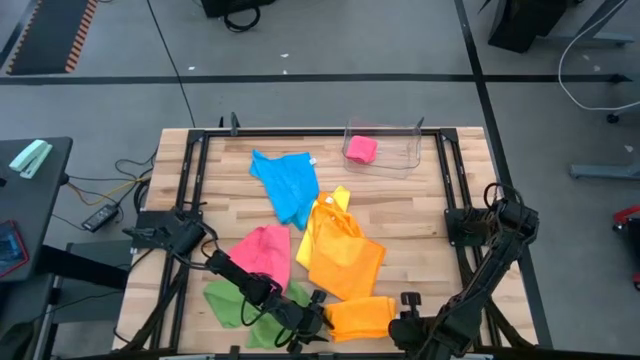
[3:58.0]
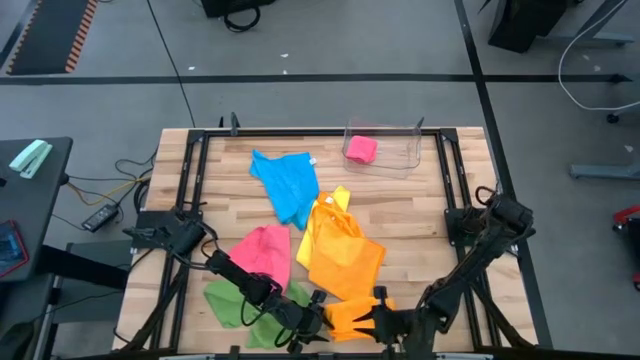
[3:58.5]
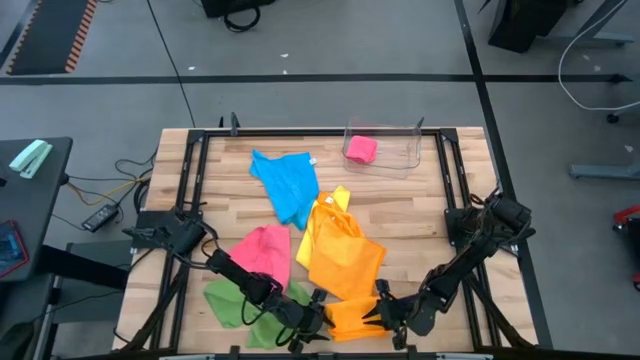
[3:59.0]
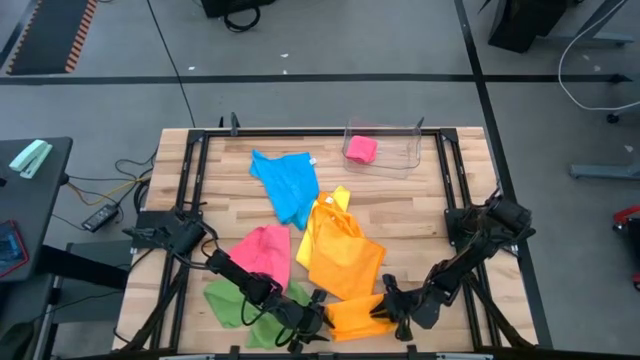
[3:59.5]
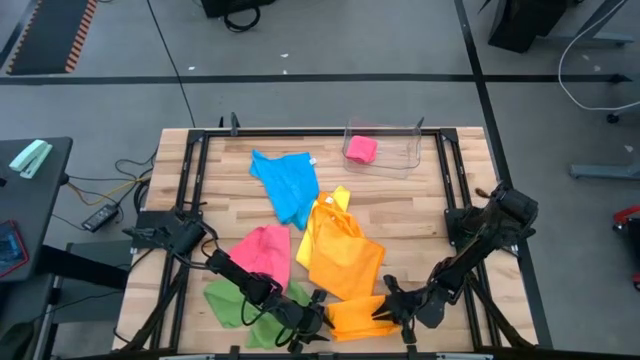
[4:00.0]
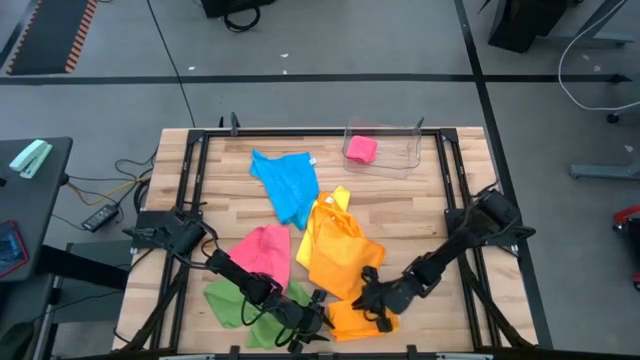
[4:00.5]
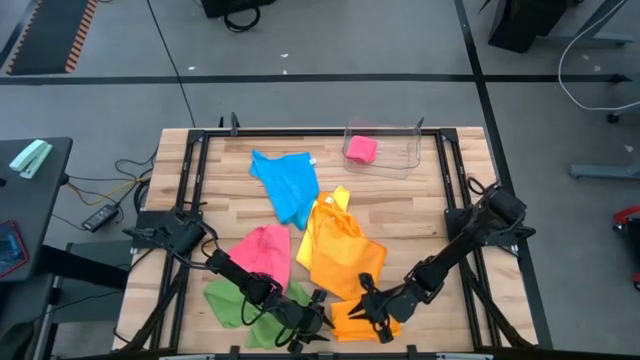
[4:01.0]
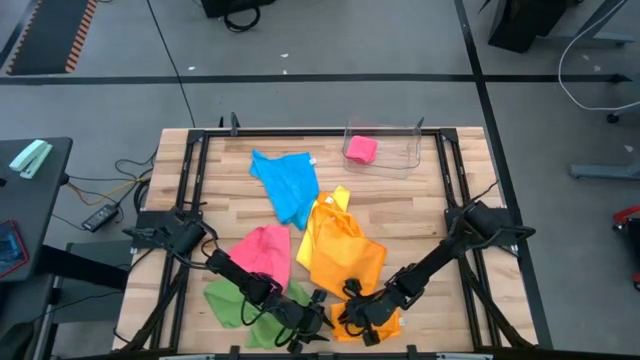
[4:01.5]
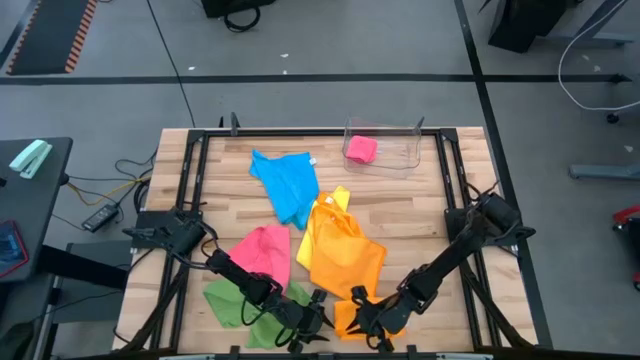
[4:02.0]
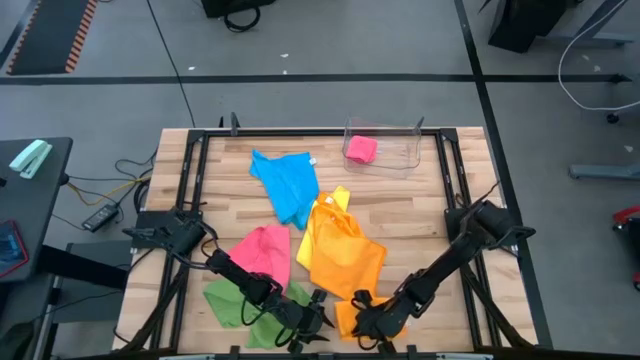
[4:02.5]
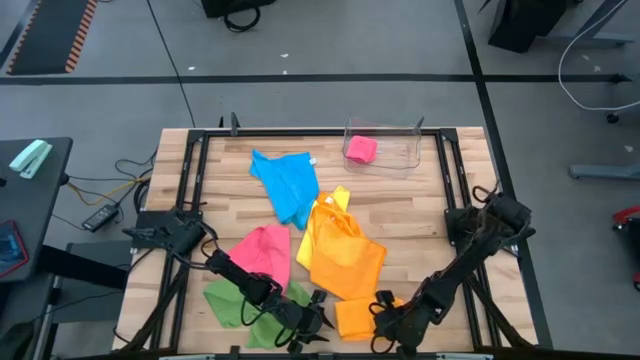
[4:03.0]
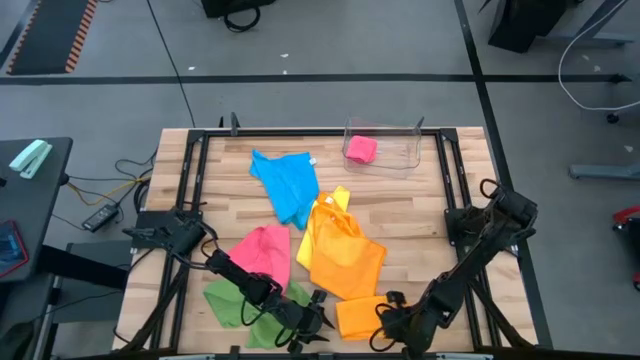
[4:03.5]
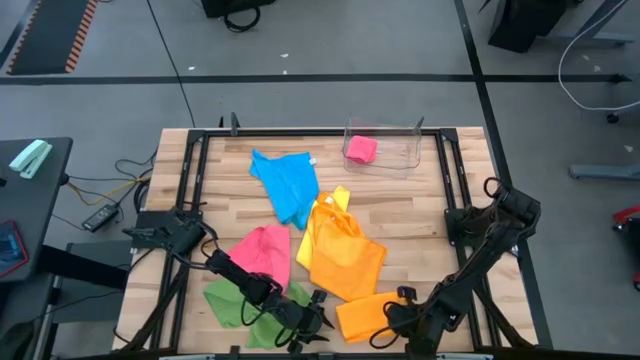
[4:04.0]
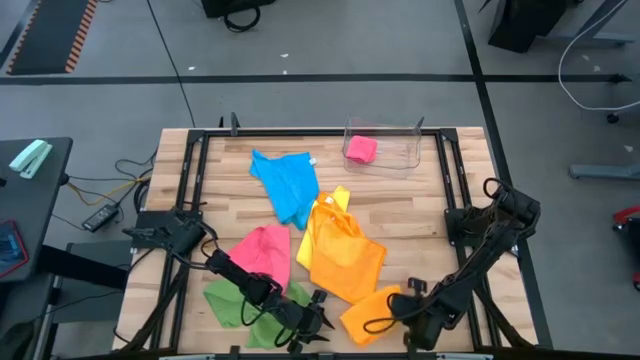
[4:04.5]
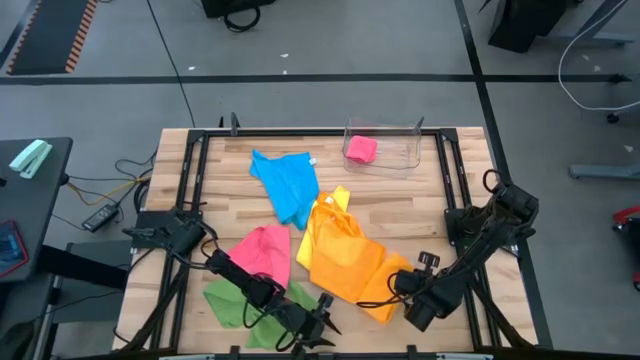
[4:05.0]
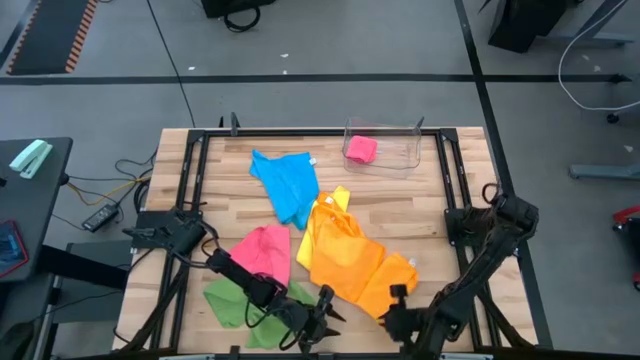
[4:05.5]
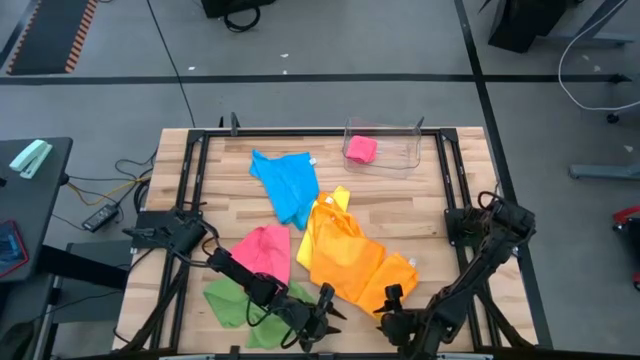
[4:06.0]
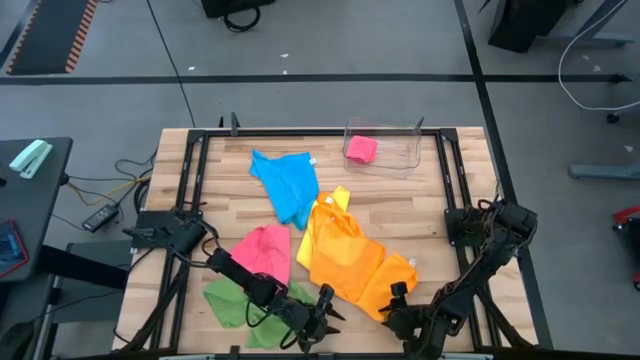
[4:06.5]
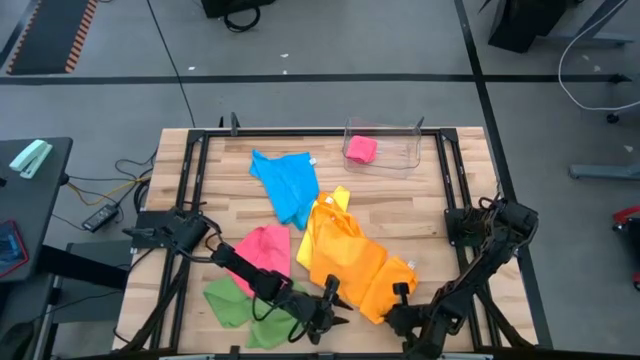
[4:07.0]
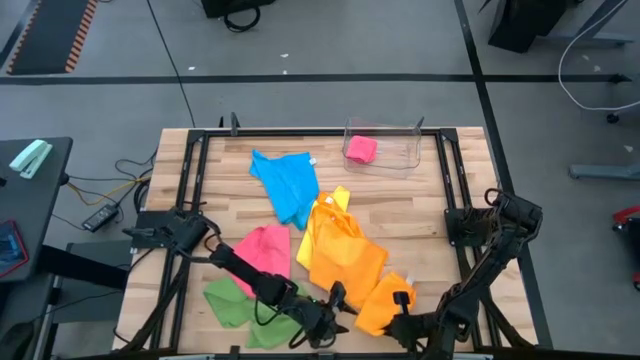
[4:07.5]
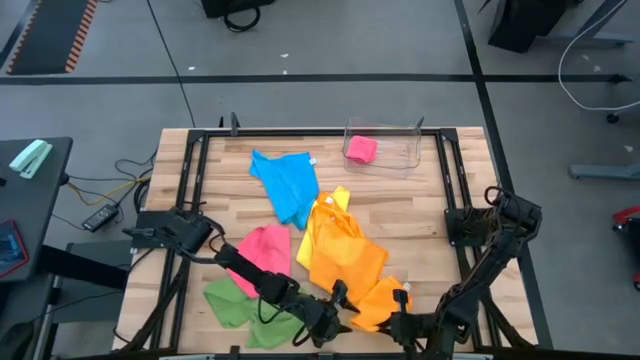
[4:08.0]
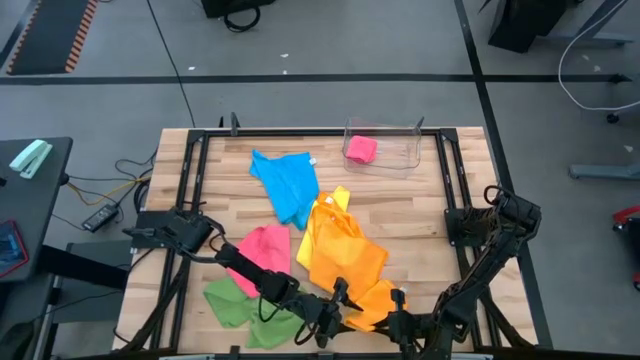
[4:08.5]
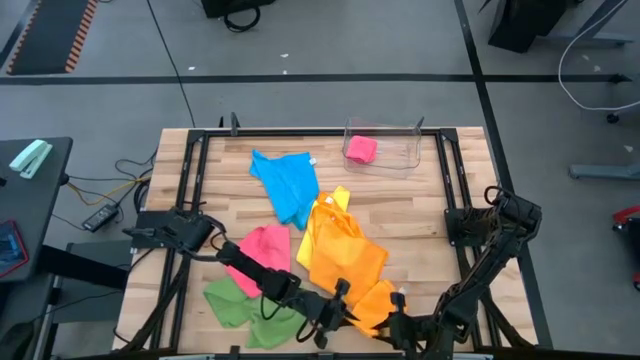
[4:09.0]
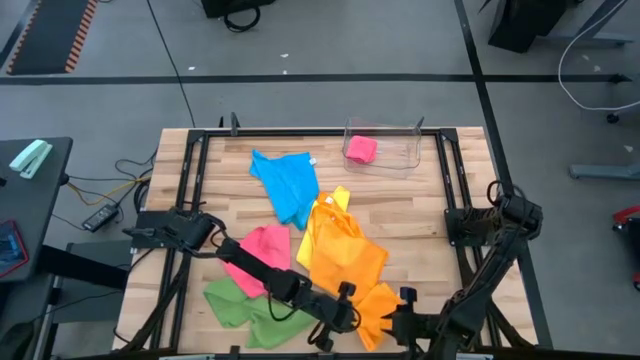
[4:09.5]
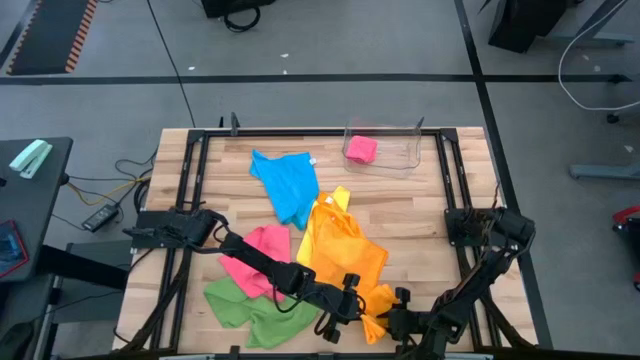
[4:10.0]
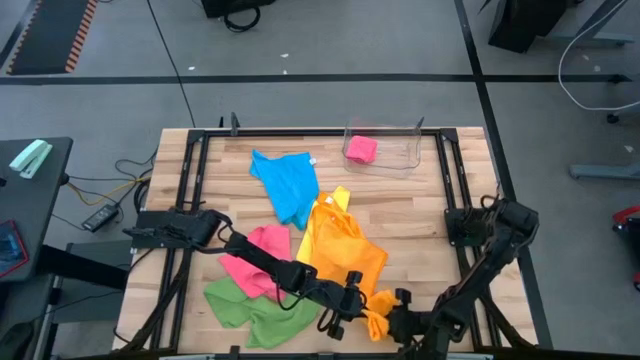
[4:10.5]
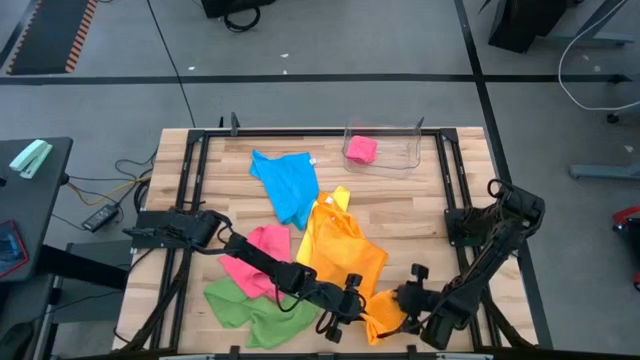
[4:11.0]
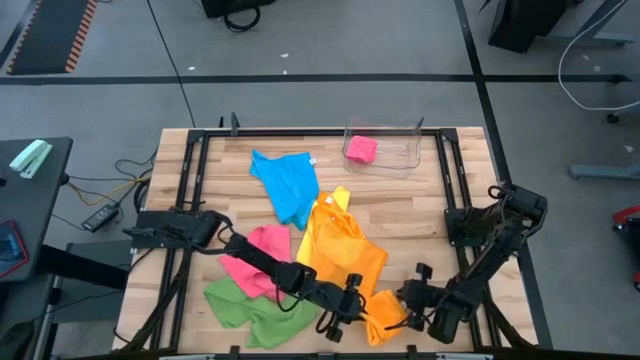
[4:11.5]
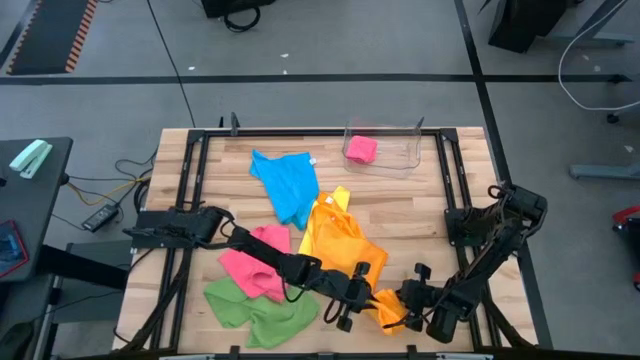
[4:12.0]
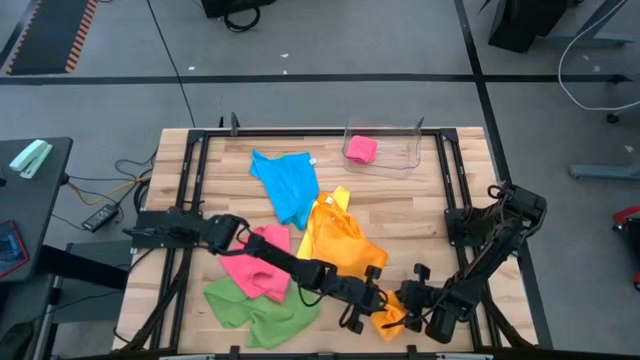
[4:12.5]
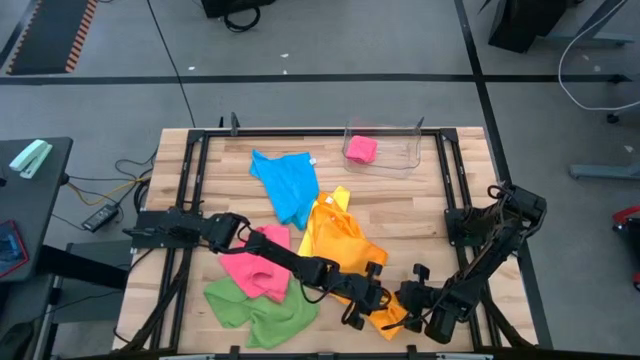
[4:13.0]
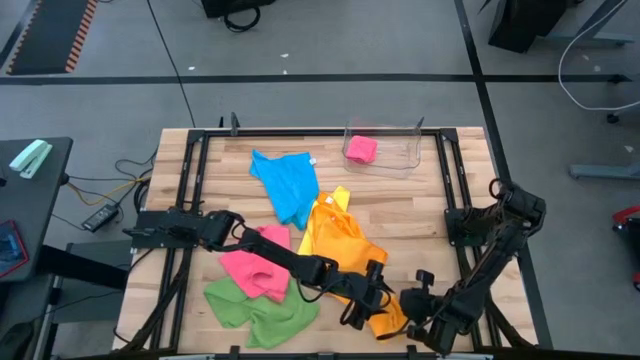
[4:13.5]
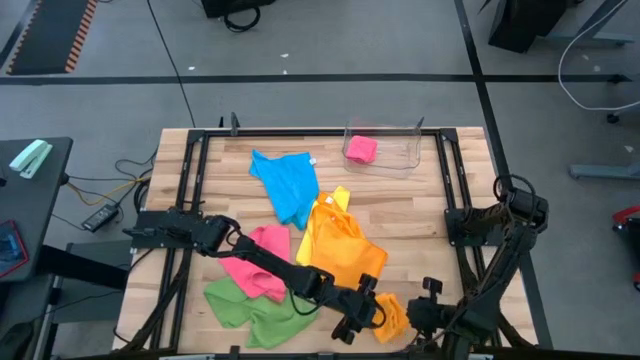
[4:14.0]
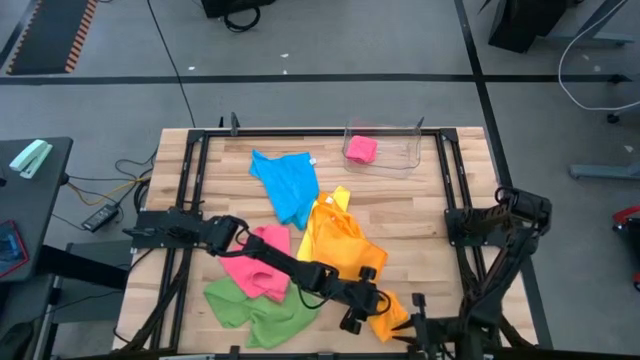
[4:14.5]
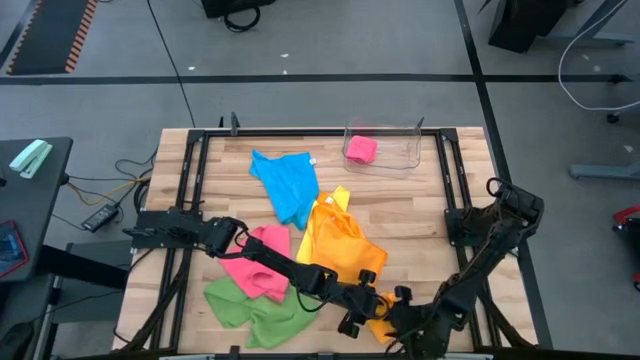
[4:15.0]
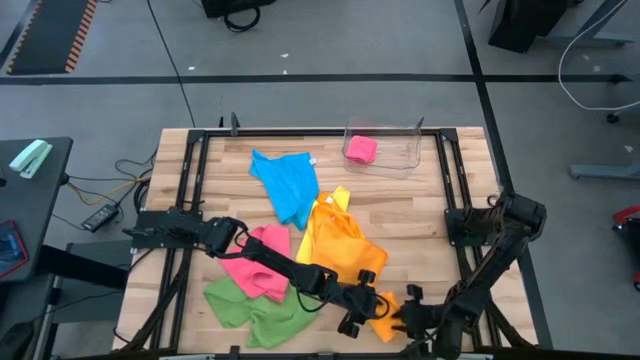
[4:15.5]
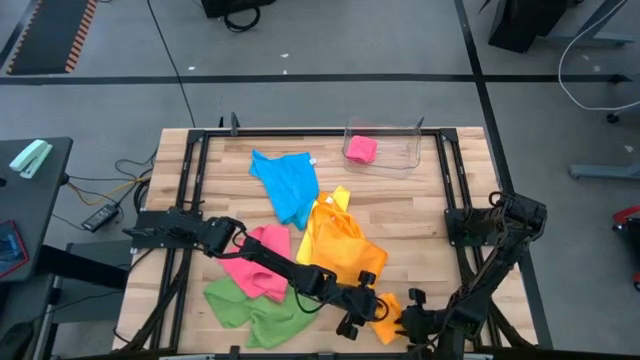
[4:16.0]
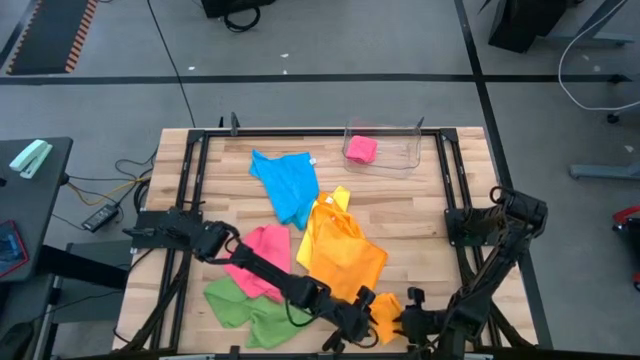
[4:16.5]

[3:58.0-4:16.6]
Task: Fold microfiber towels
Fold the right orange microfiber cloth
